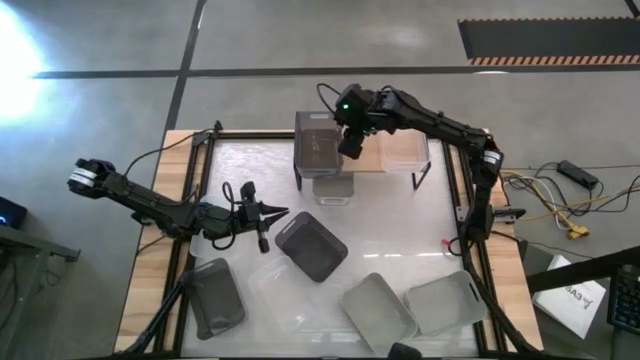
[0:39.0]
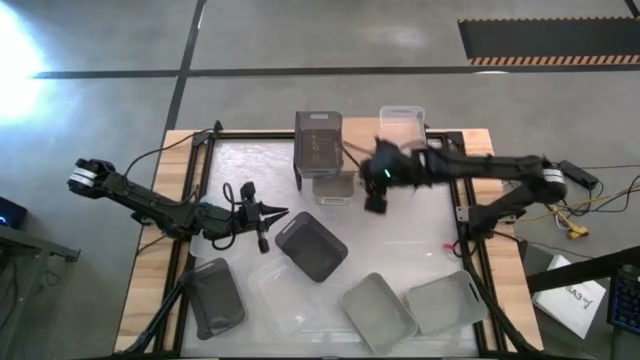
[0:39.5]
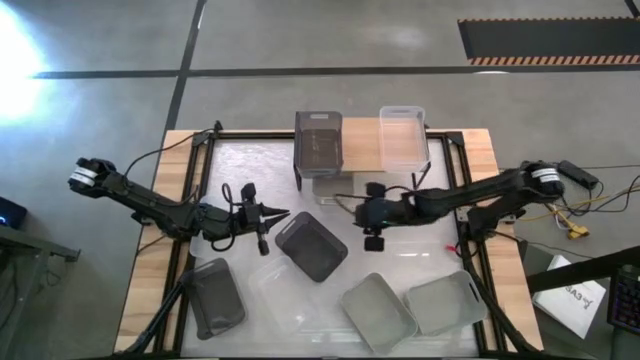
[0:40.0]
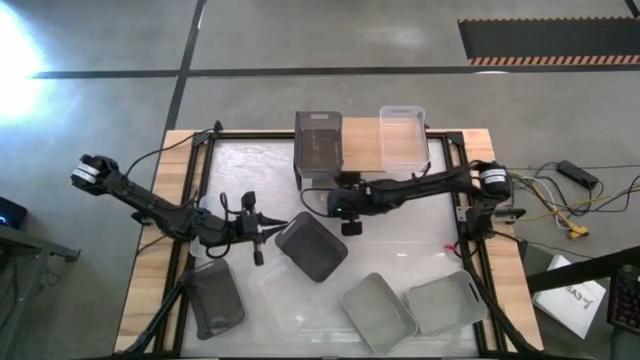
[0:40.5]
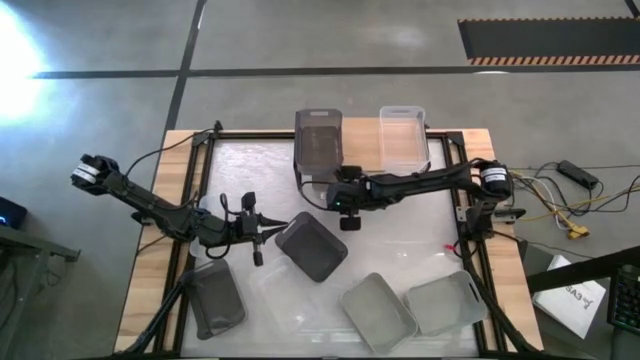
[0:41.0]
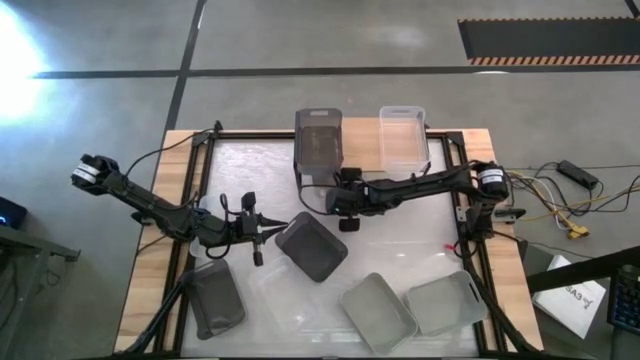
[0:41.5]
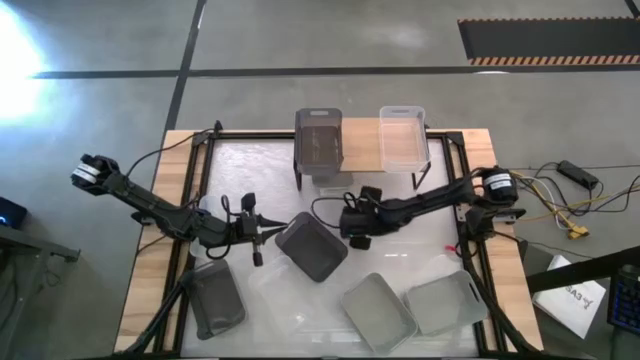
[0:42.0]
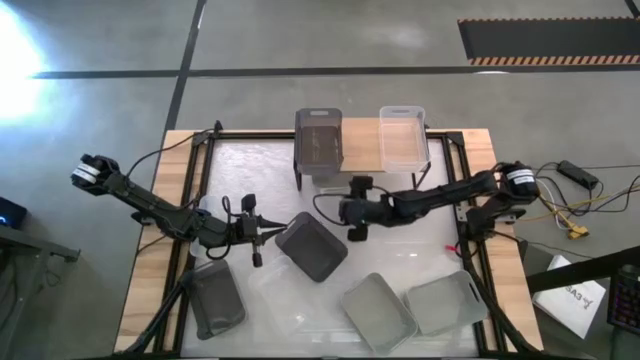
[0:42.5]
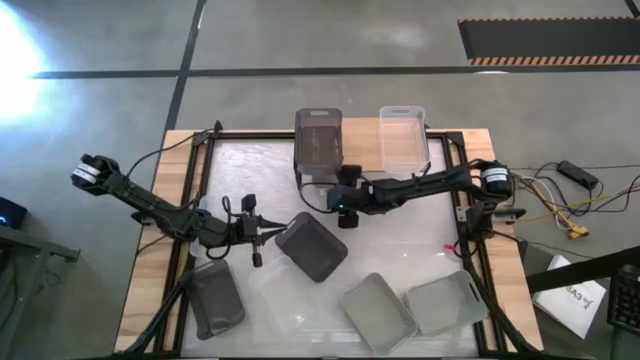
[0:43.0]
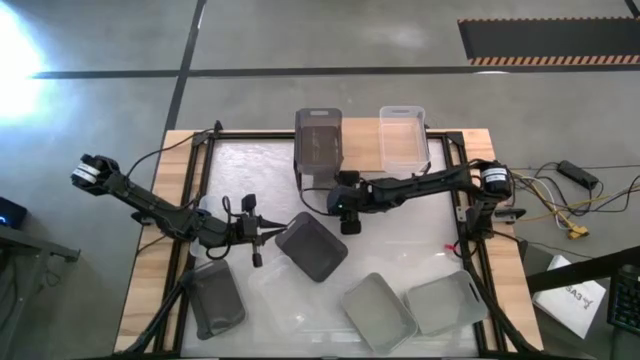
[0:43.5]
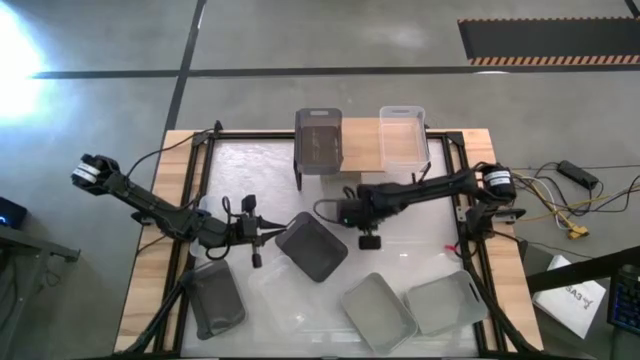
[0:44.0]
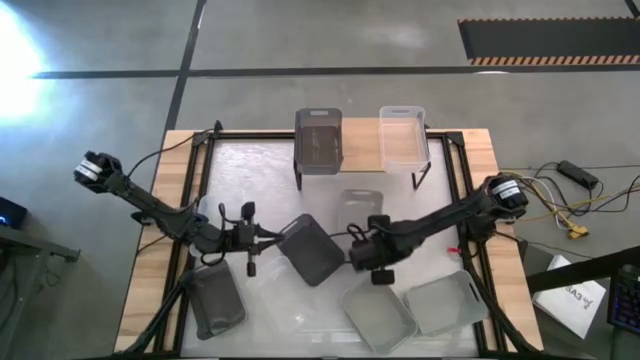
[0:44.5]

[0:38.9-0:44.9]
Task: Stack baskets on shelf by color
Move the top gray bin to the center of the table

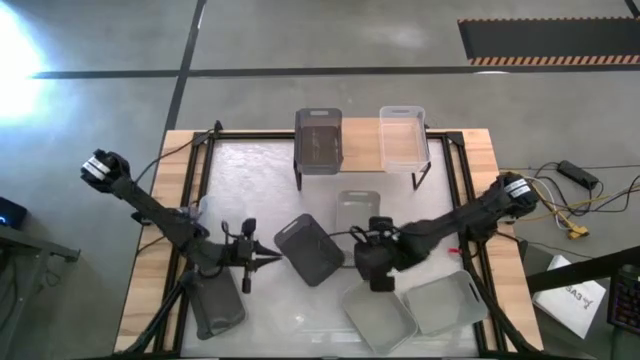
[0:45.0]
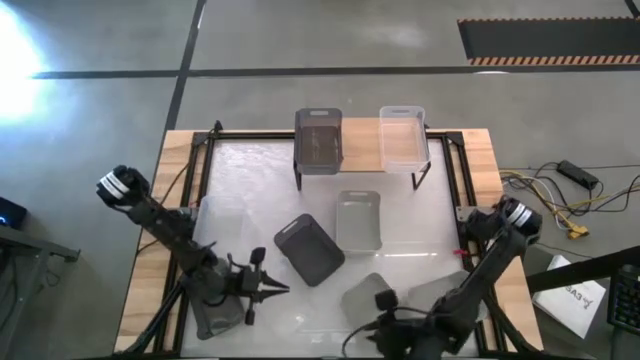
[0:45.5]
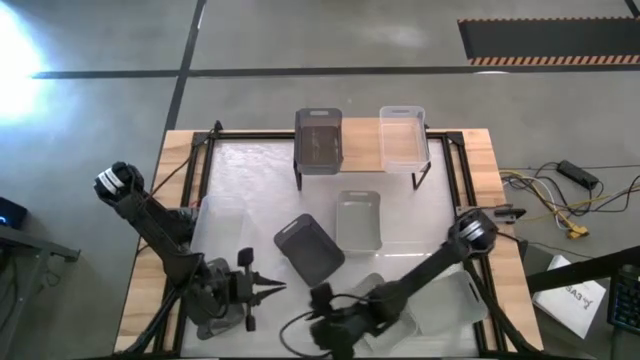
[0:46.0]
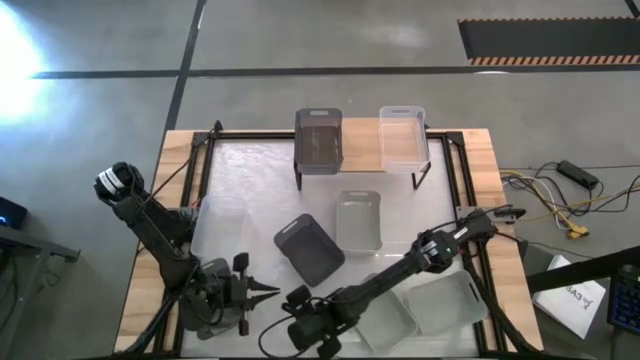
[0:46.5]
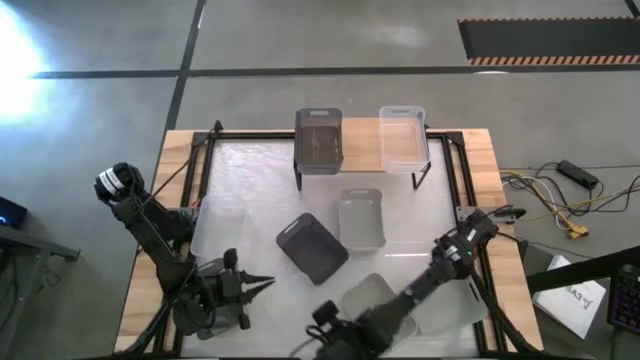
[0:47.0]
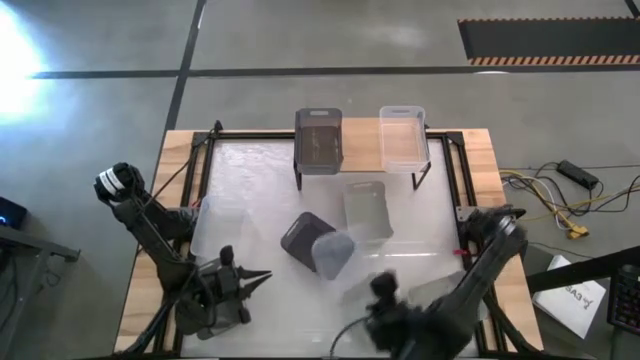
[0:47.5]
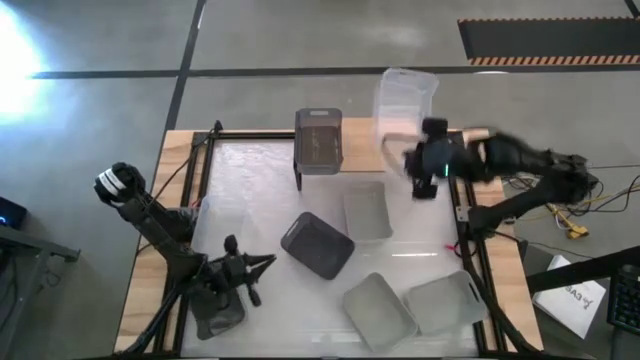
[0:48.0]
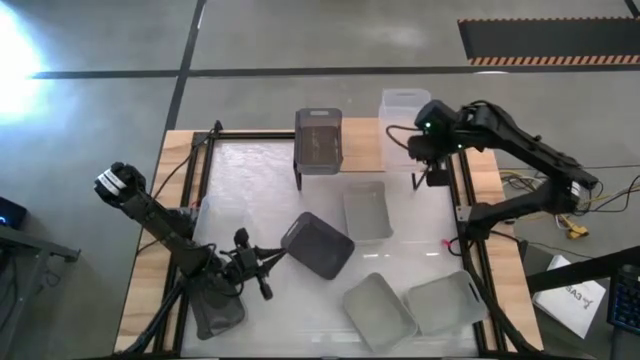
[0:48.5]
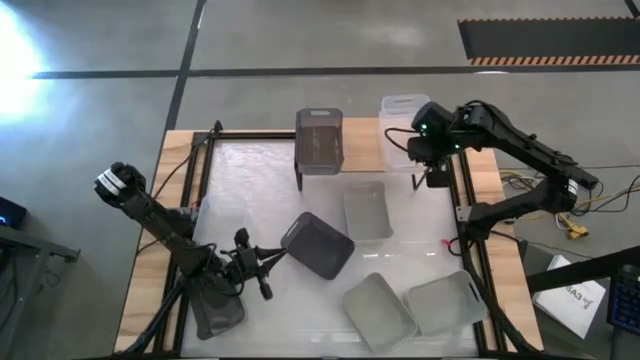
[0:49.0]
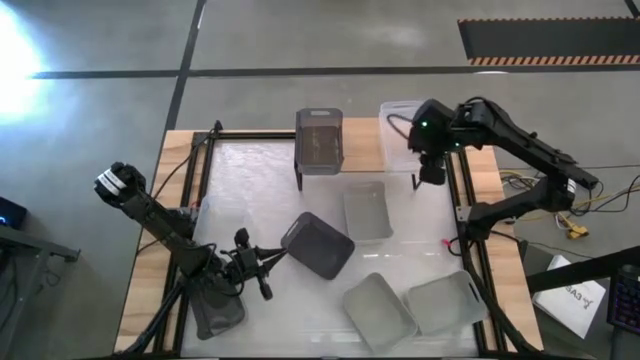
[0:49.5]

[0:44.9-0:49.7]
Stack the bottom transparent bin on top of the transparent bin on the shelf

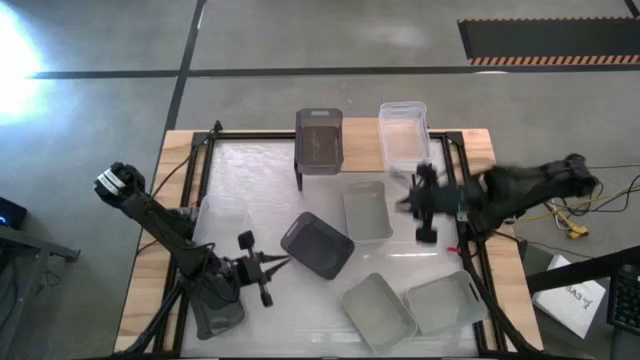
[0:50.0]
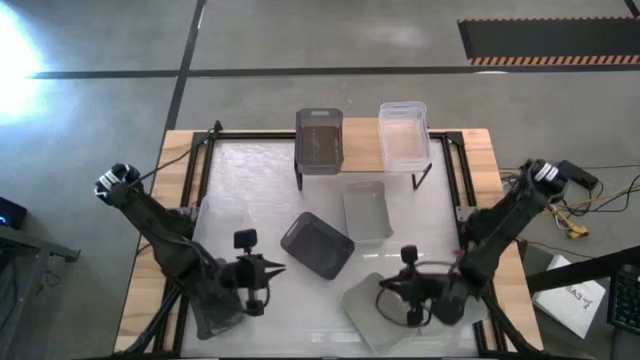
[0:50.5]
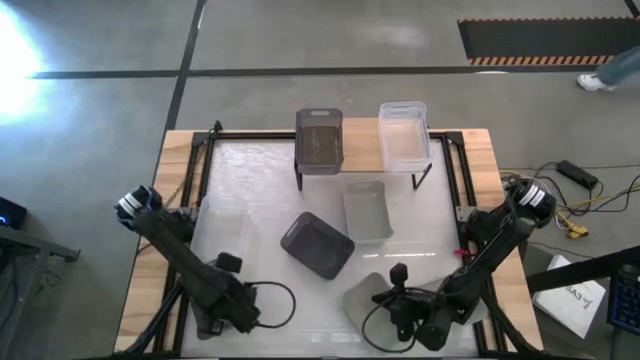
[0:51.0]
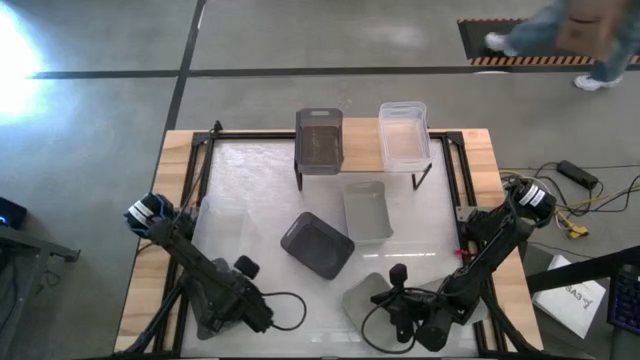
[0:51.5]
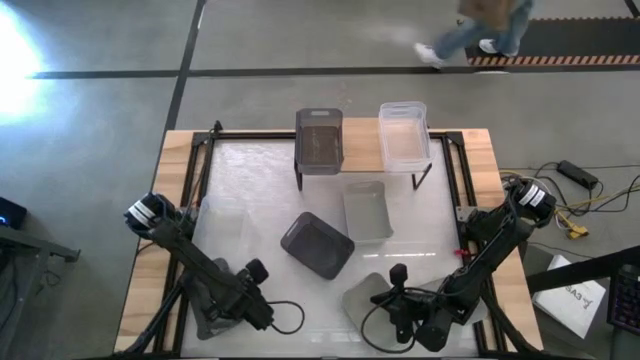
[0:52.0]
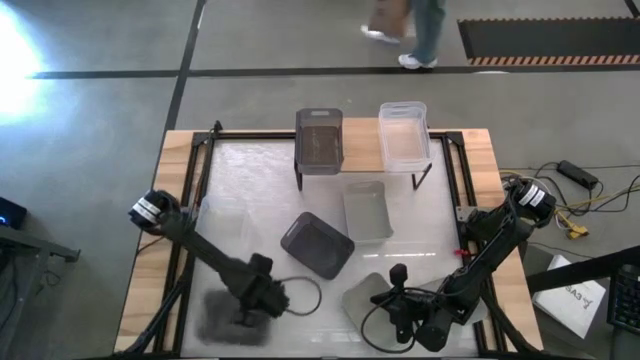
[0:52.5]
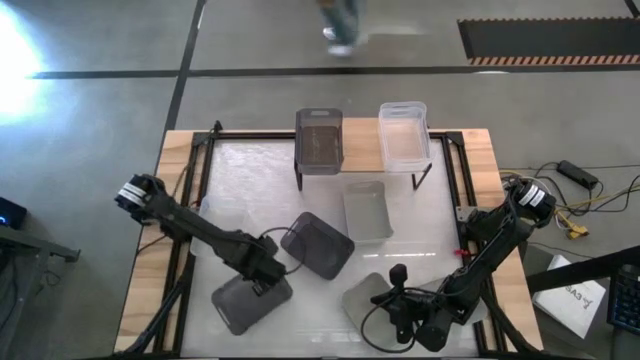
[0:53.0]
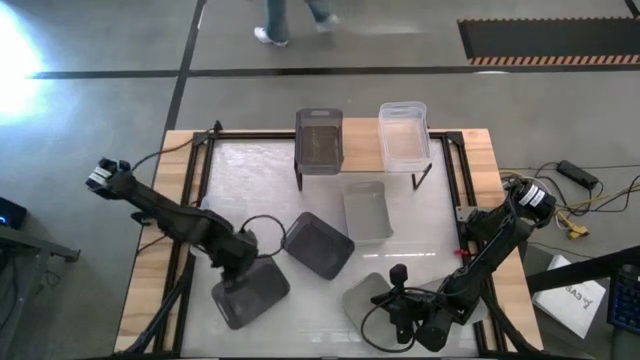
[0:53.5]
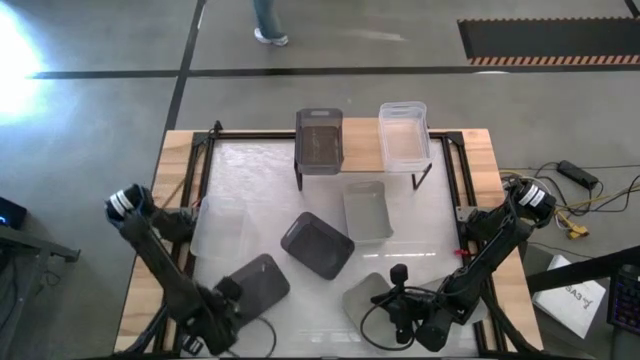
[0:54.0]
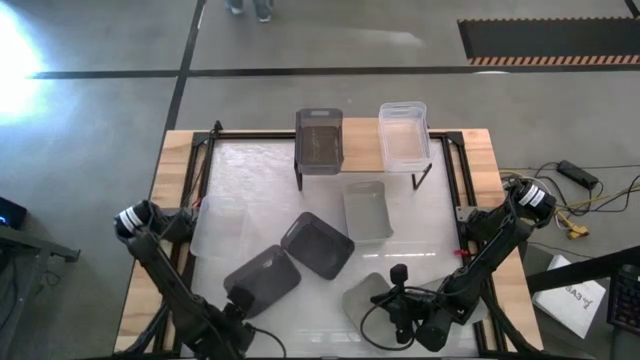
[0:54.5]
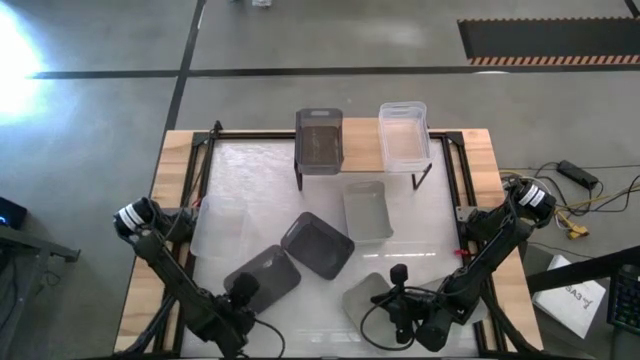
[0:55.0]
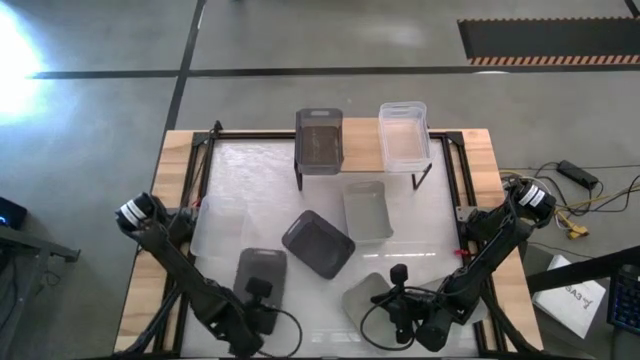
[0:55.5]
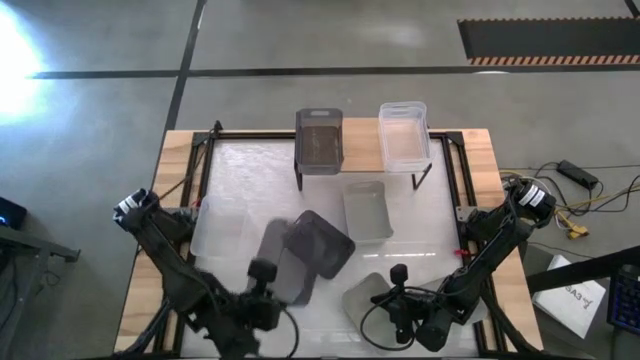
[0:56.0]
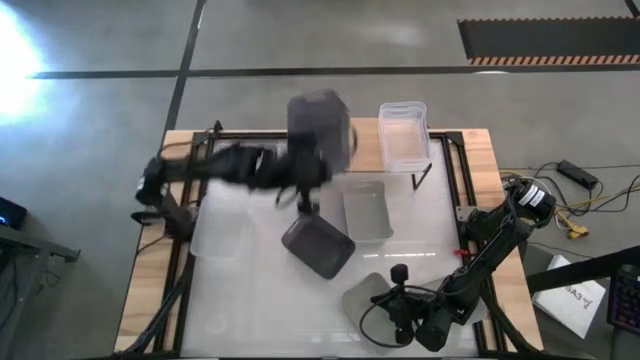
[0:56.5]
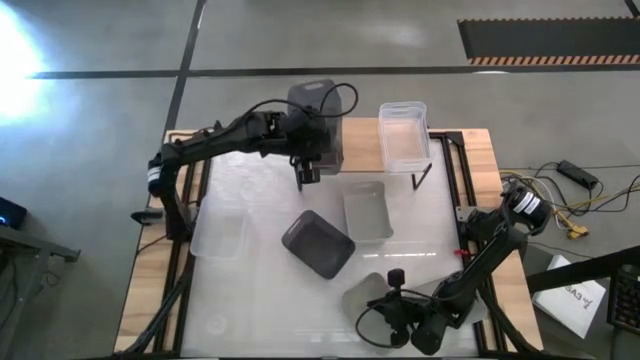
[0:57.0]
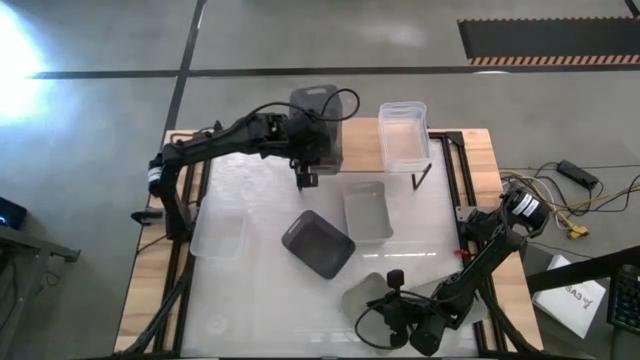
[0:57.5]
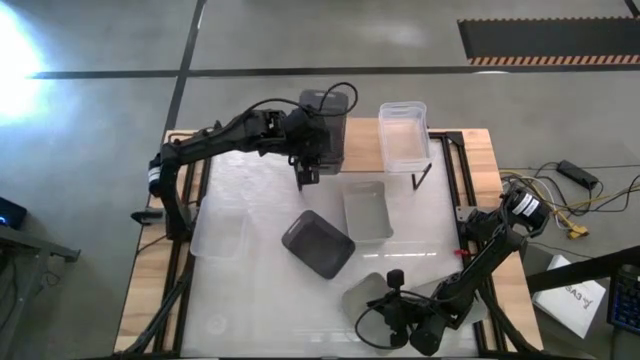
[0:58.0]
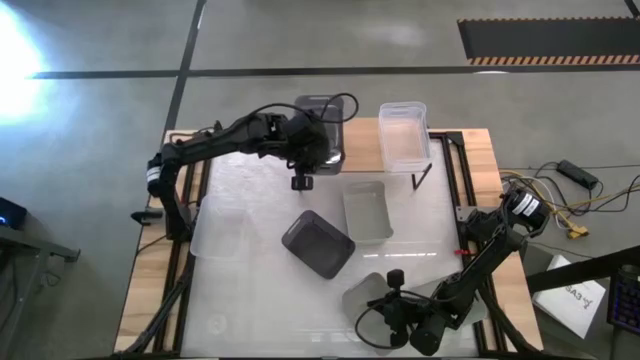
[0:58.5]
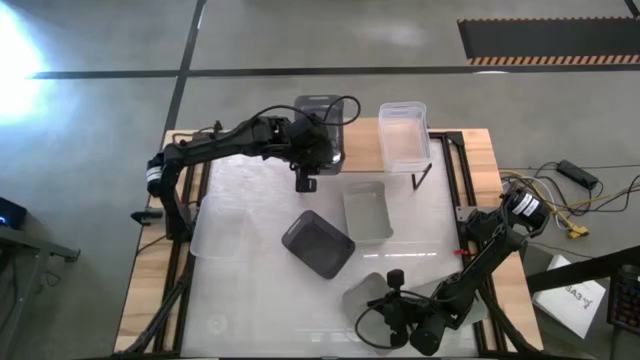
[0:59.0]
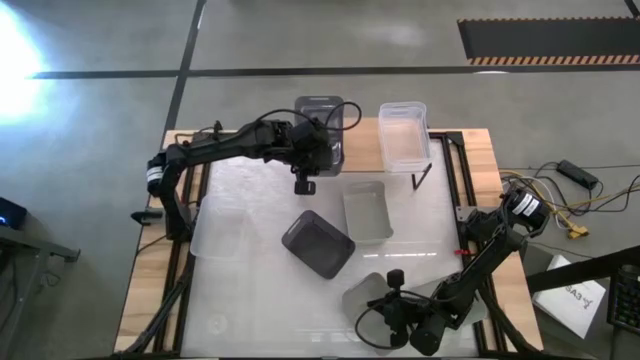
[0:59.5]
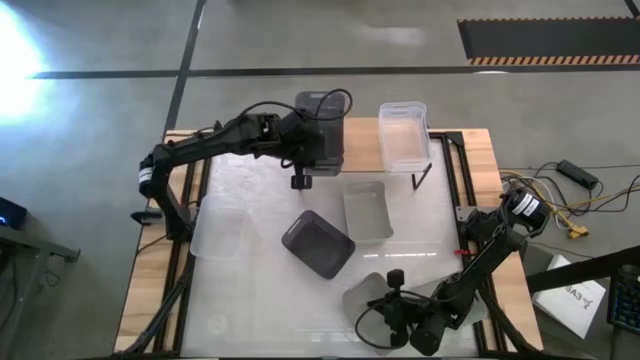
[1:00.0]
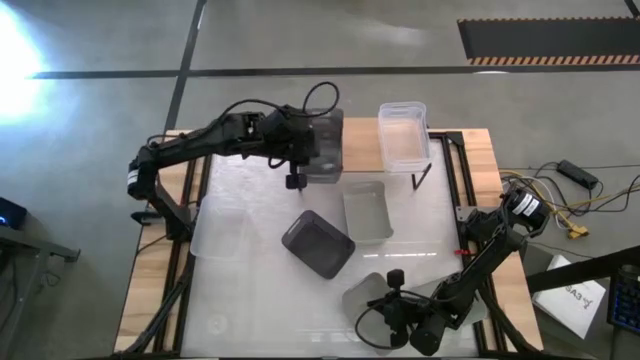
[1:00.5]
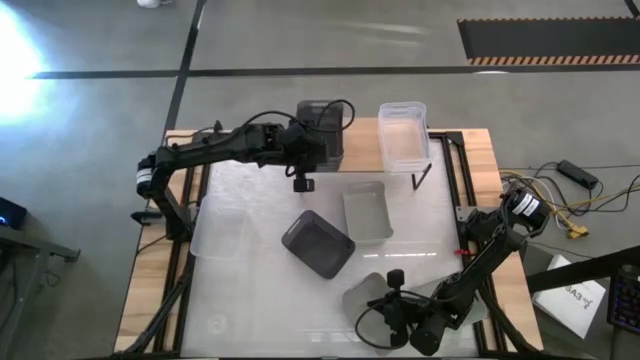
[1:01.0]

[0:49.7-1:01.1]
Stack the bottom black bin on top of the black bin on the shelf
